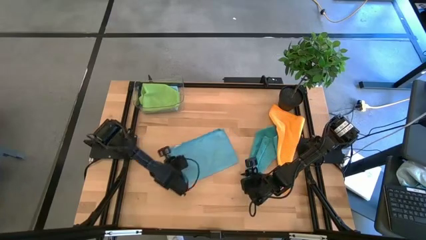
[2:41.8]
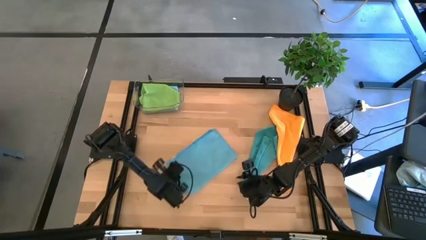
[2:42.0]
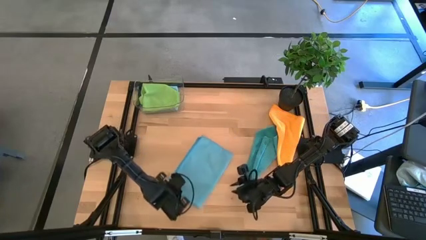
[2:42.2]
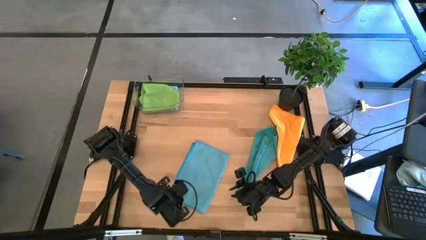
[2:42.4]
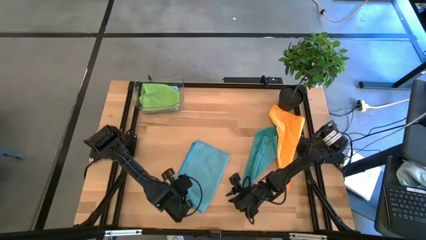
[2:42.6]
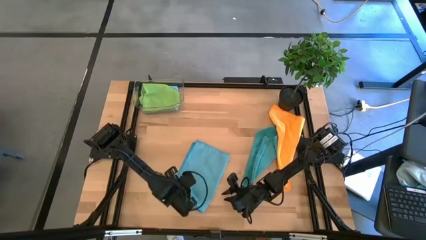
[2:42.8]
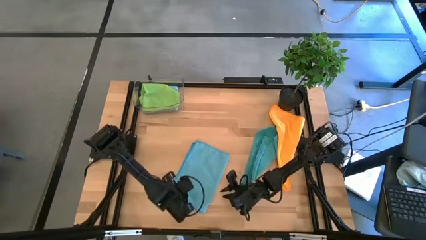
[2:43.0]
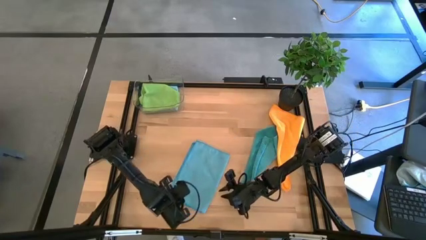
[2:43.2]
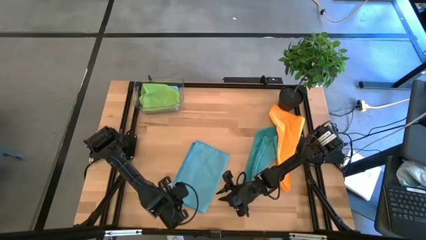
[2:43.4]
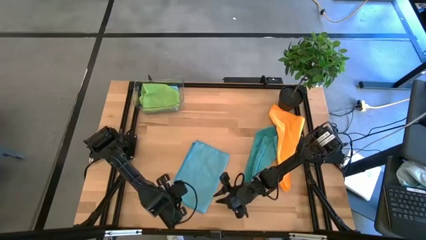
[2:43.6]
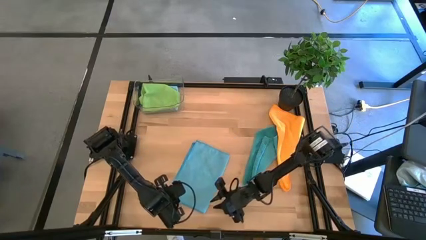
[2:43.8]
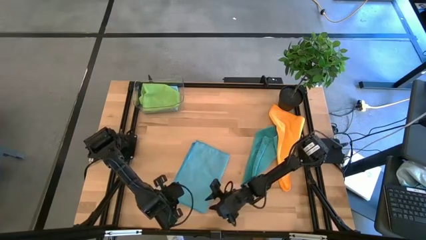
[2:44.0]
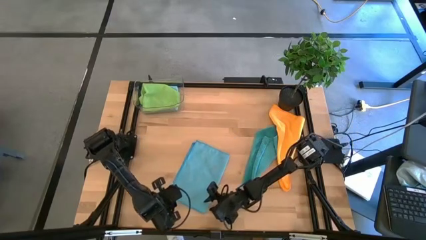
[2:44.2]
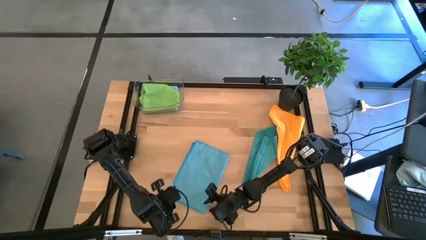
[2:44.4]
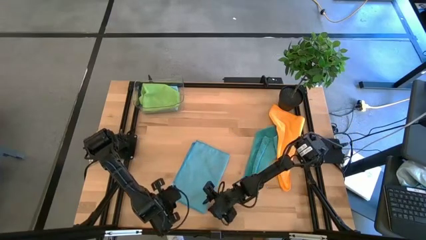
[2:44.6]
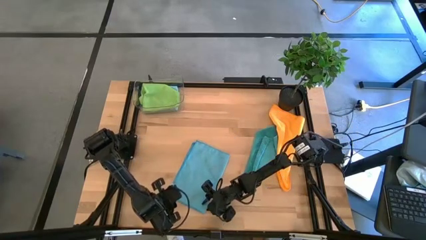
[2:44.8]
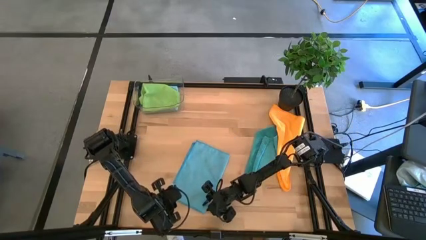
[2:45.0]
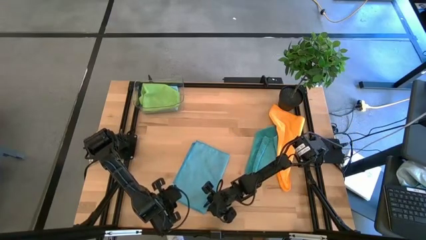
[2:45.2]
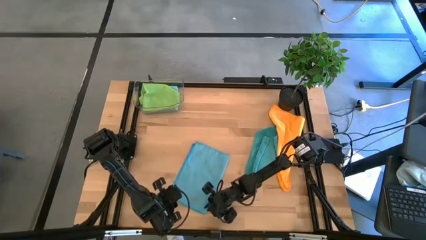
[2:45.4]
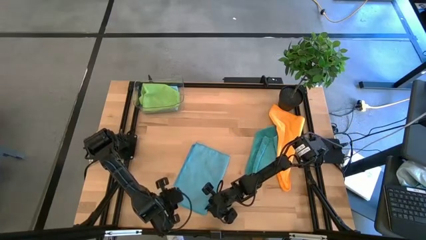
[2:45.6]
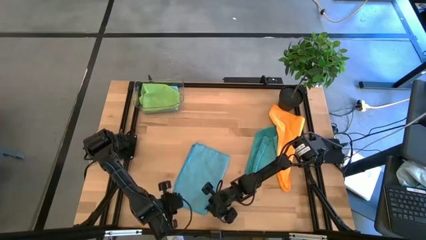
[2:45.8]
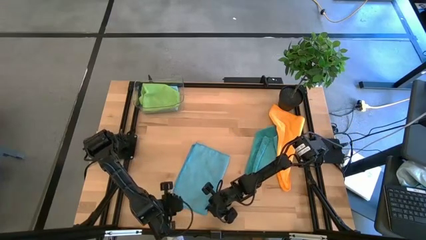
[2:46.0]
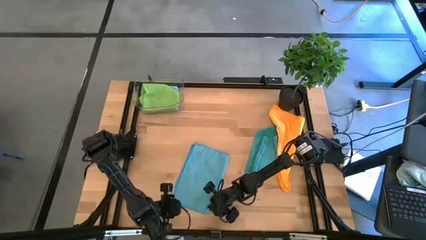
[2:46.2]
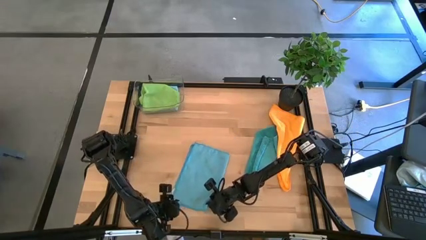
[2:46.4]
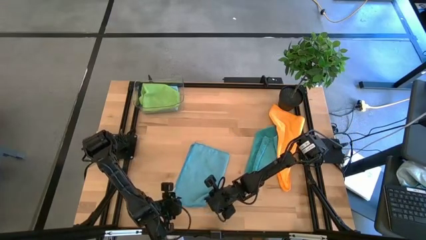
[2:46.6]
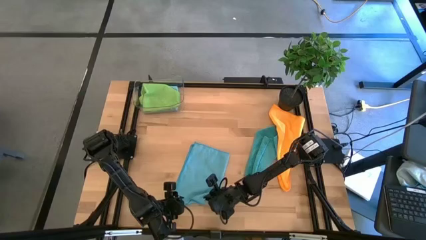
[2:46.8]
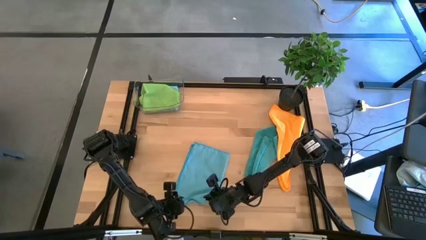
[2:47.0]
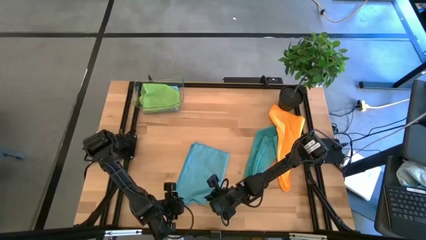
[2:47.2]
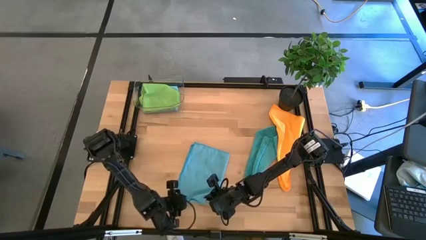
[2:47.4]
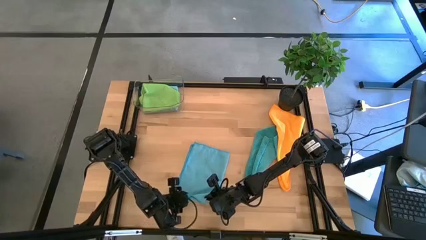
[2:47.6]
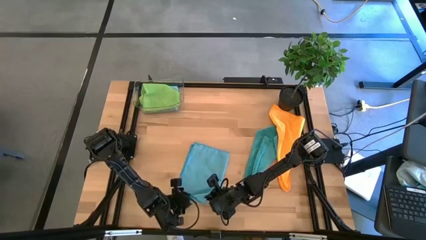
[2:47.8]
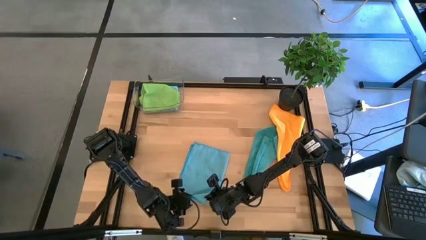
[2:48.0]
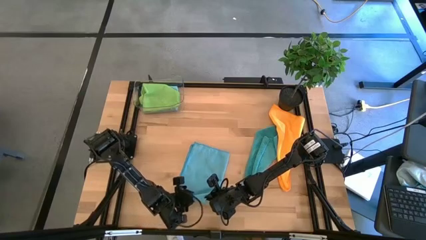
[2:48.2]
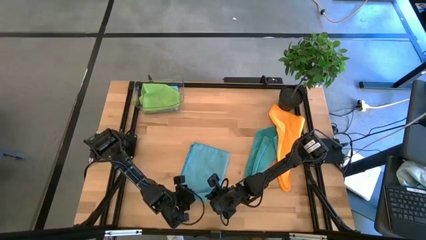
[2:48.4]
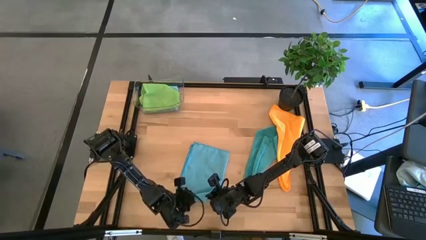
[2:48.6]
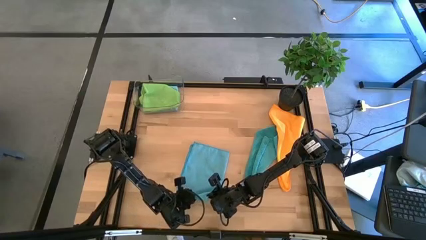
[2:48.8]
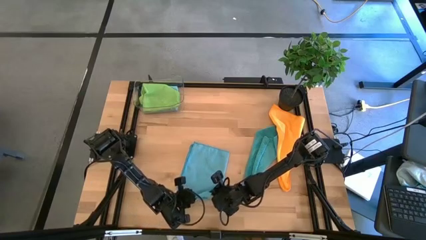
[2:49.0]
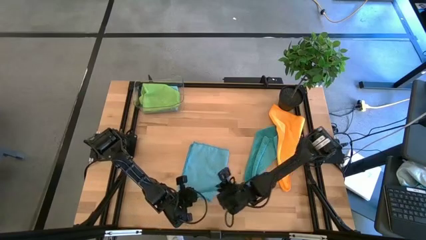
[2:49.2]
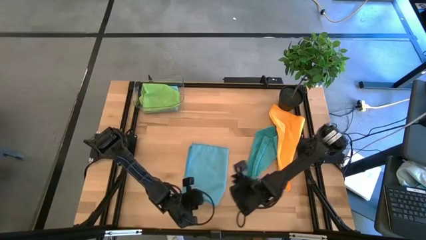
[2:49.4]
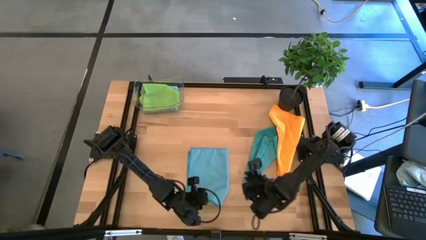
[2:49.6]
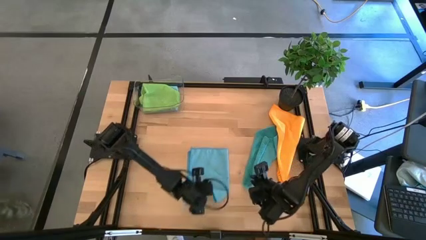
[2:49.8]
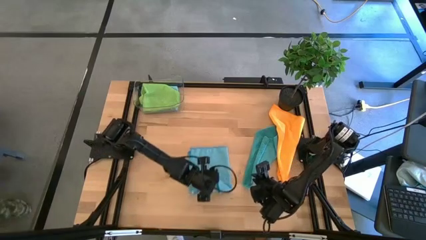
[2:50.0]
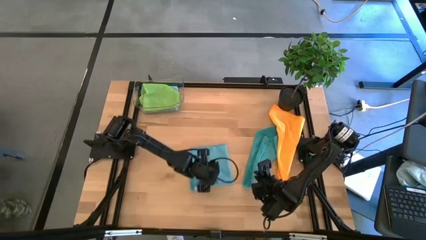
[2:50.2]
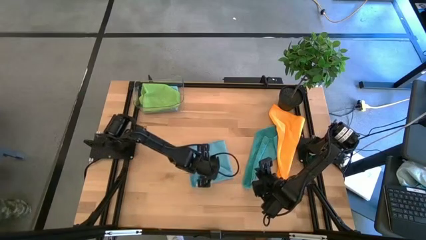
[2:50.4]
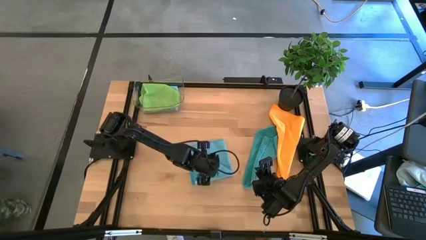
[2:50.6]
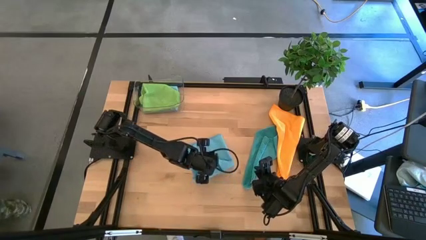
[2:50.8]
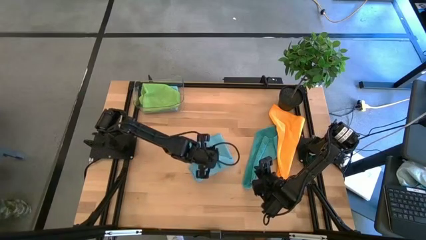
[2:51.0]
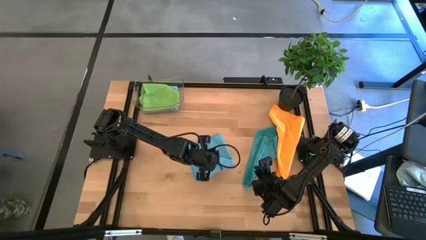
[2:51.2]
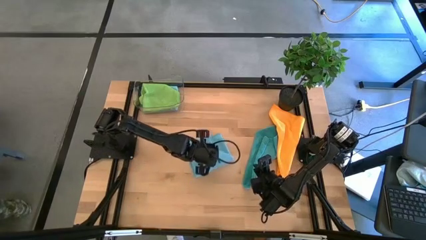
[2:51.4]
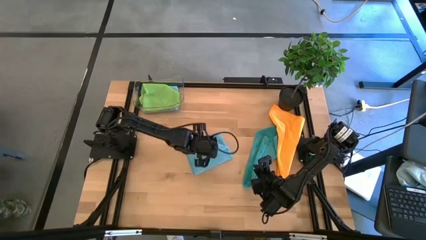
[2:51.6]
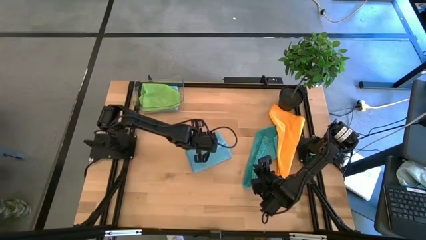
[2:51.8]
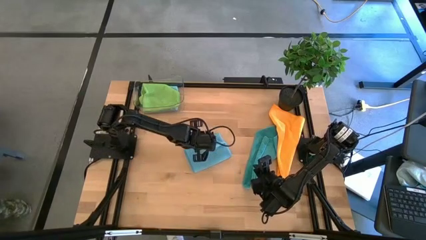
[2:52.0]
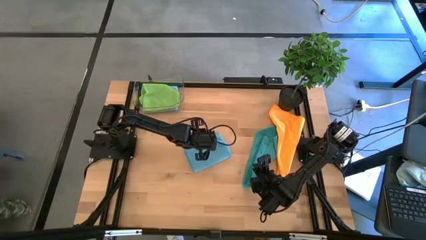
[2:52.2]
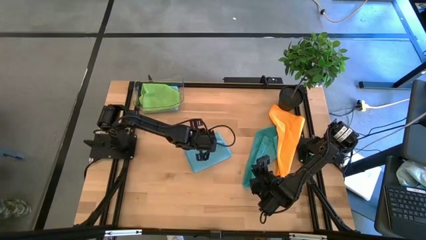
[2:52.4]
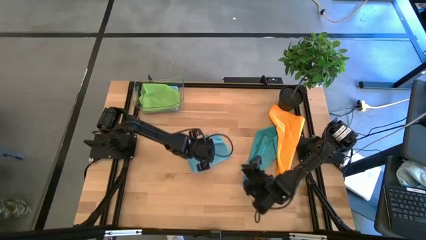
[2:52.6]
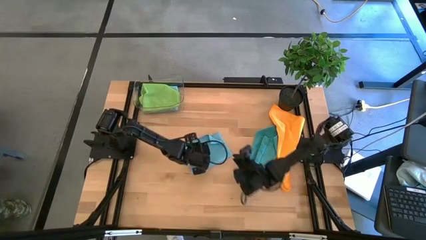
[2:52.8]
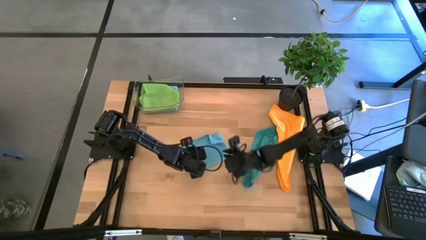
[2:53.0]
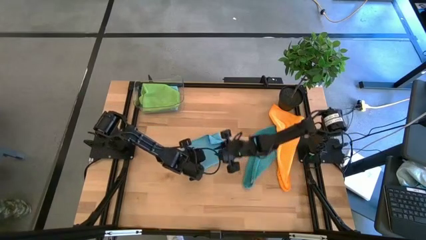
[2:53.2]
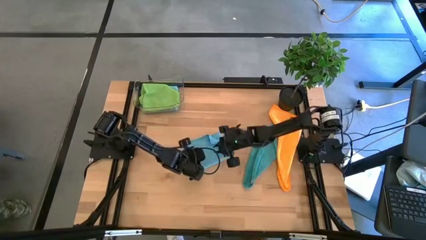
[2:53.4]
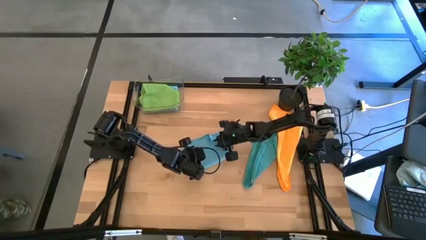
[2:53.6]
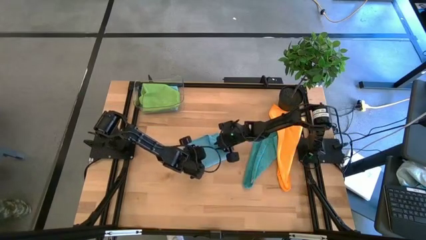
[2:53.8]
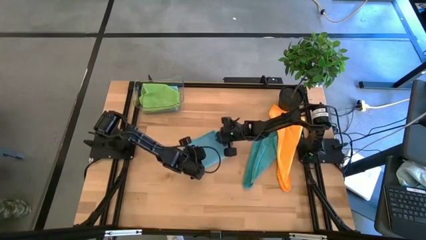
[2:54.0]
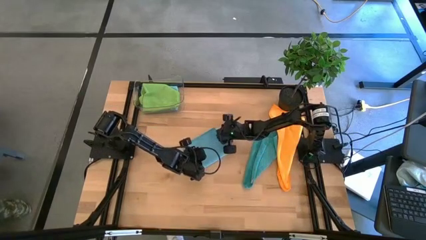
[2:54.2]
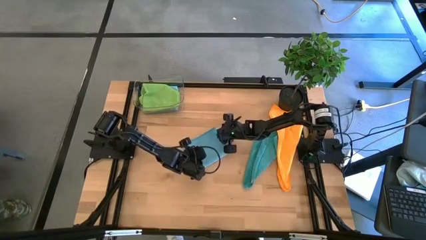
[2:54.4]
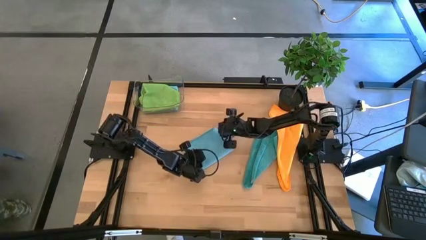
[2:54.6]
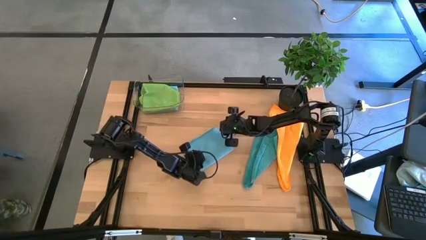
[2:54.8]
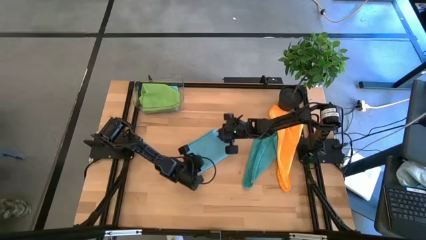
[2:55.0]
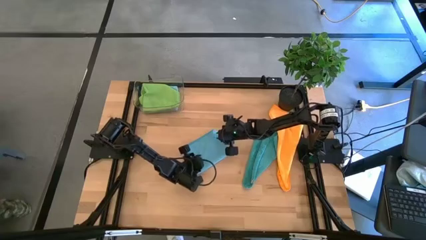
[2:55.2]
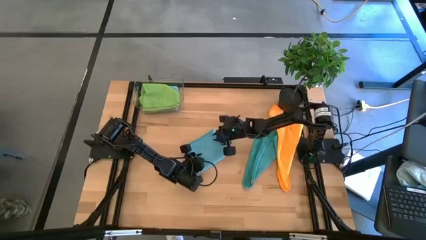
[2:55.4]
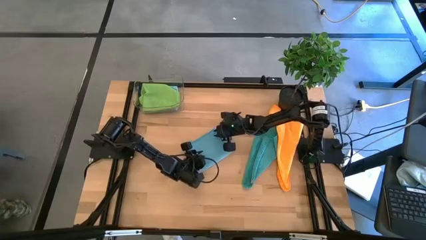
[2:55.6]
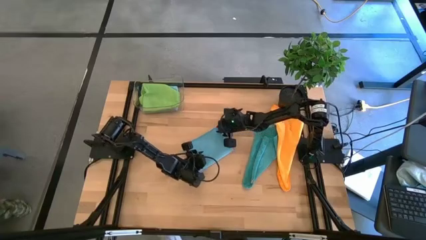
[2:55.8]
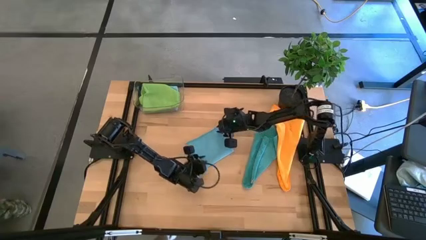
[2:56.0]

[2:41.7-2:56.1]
Task: Fold microfiber towels
Fold the light blue microfiber cloth
